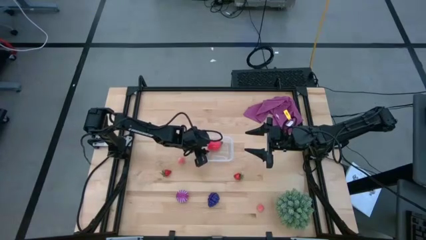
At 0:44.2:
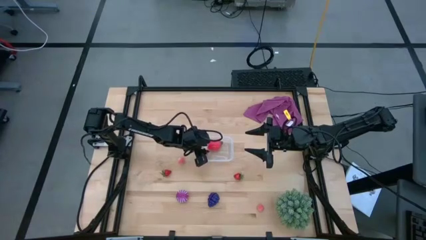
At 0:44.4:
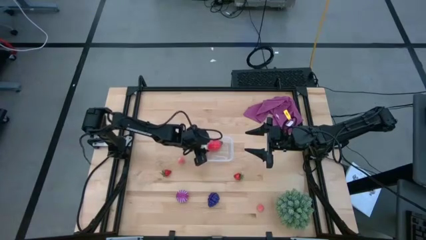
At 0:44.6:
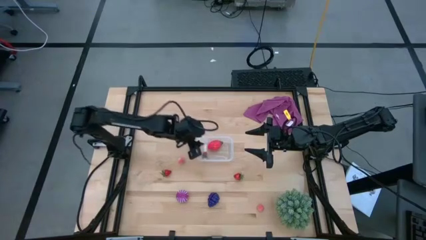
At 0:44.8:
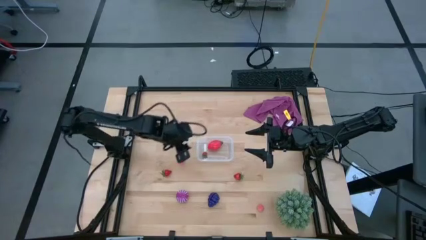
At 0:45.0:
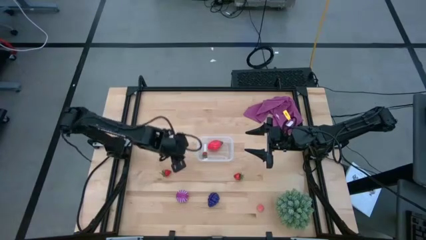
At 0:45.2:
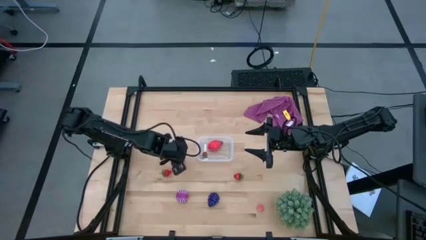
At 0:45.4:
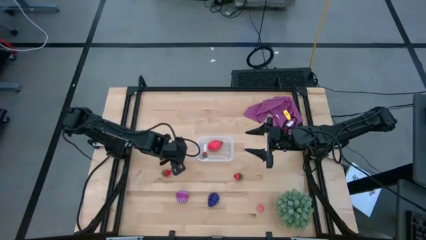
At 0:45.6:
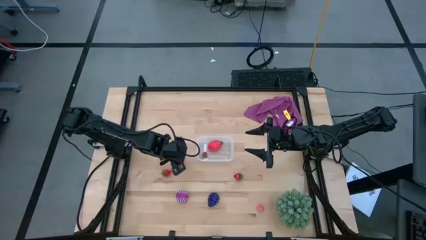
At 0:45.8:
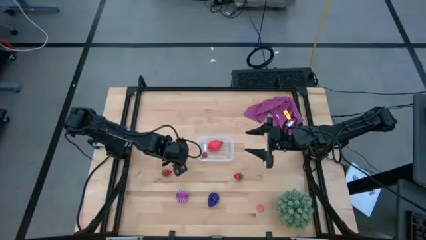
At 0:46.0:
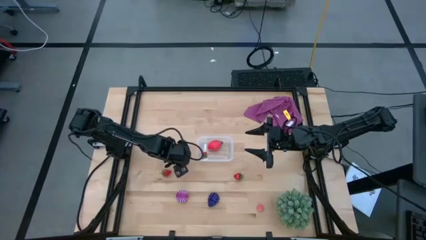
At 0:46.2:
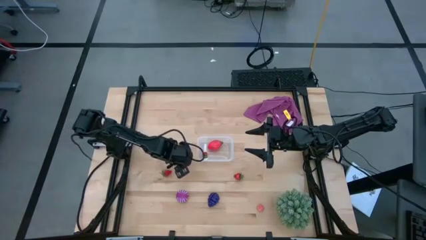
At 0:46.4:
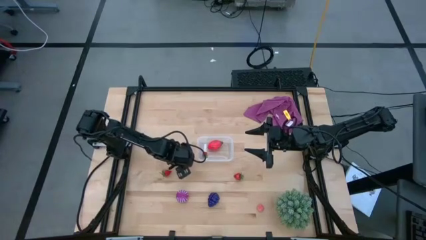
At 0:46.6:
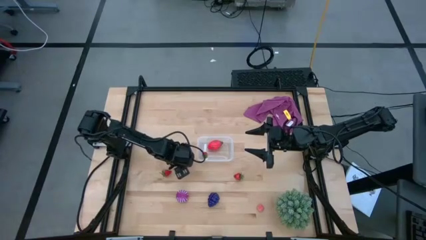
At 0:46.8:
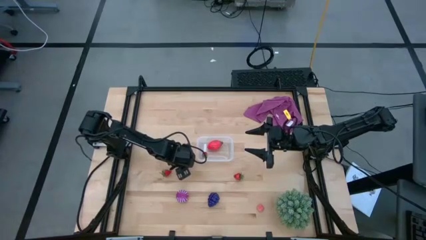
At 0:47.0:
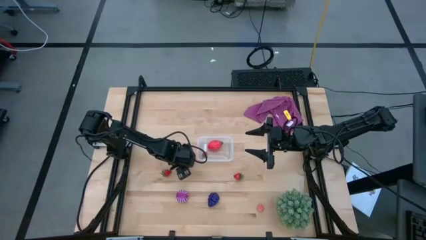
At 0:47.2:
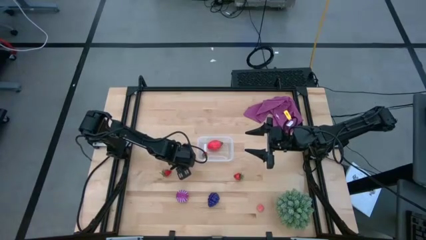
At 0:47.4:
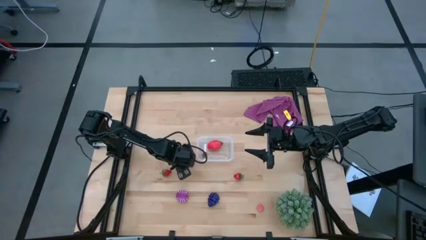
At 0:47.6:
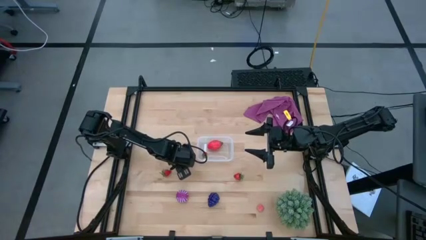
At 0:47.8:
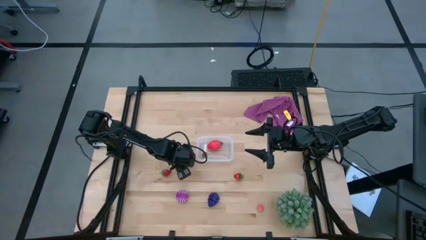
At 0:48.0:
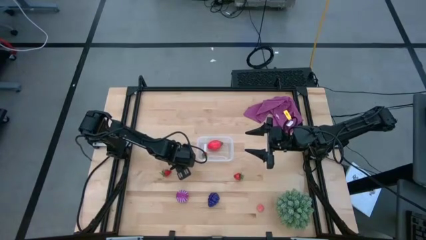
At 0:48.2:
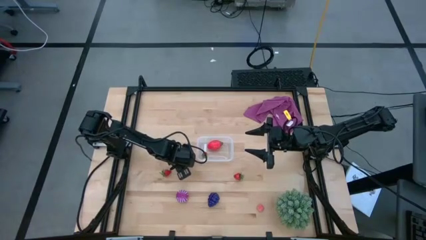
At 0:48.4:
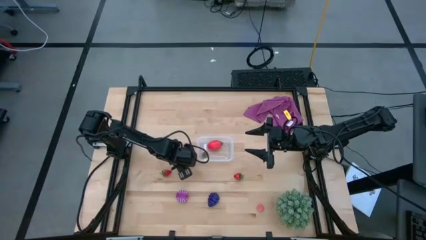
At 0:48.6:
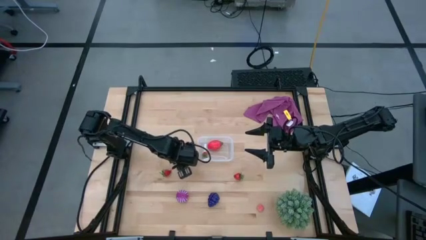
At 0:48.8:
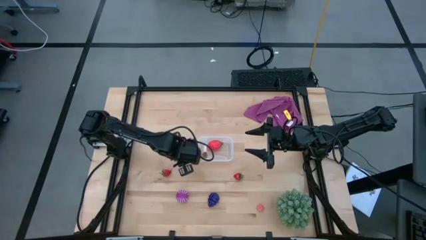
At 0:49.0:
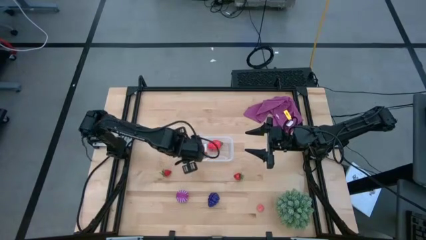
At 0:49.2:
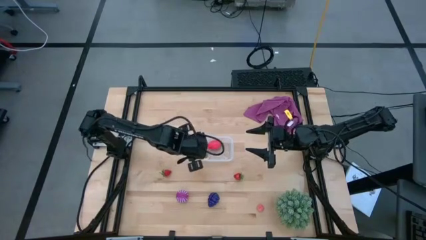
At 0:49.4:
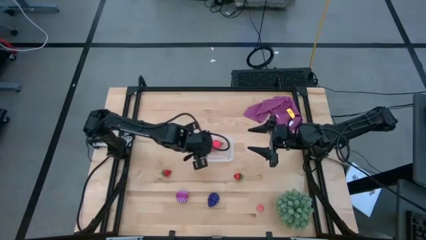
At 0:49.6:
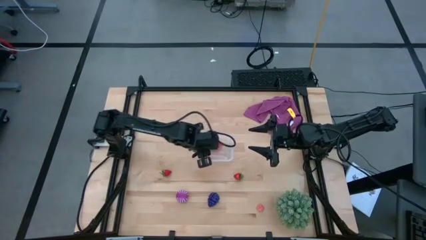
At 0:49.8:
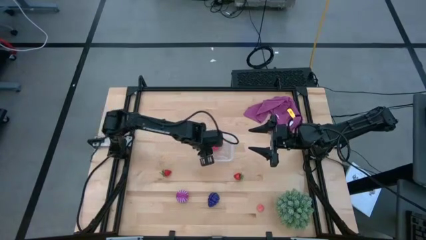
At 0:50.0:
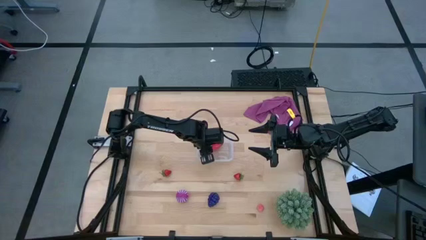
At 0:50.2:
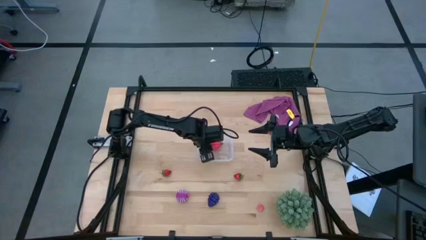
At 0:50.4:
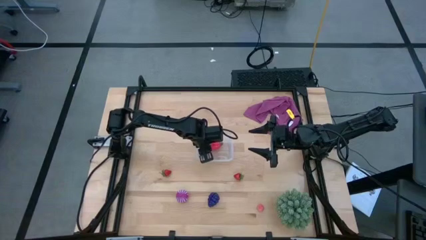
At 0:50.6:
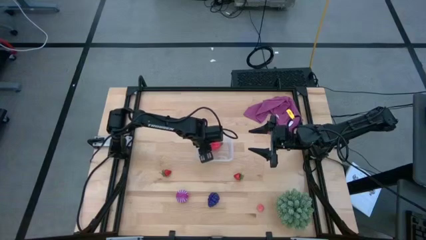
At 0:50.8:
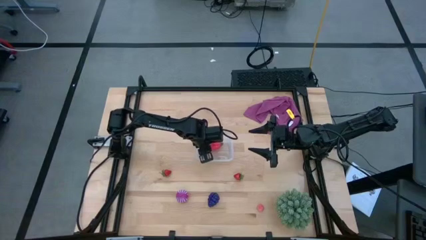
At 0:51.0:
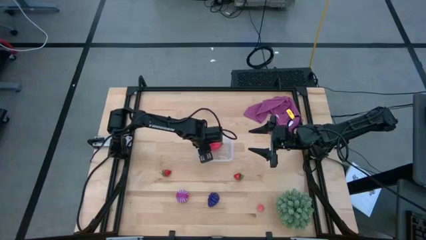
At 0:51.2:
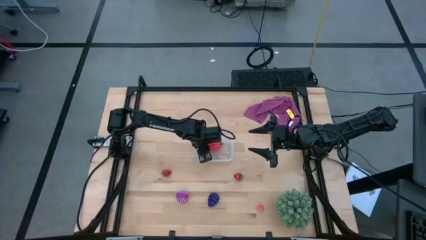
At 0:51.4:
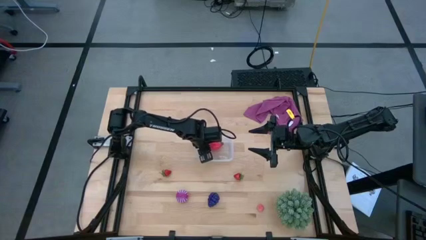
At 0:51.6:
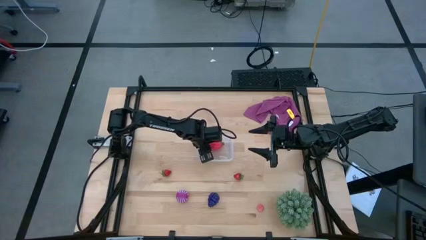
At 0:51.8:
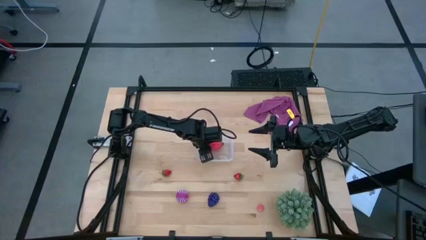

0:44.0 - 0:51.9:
Task: Pick and placing Produce into tupperware
Put the left pink peach into the transparent container

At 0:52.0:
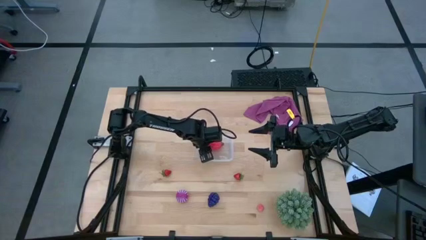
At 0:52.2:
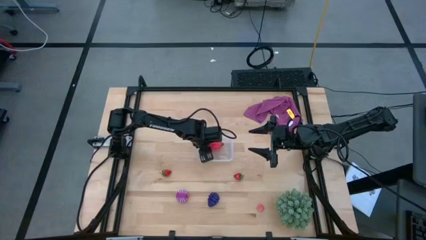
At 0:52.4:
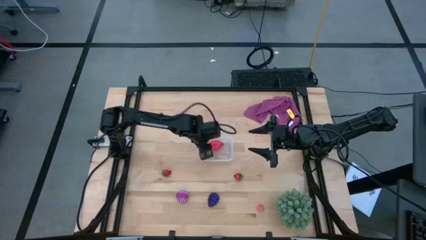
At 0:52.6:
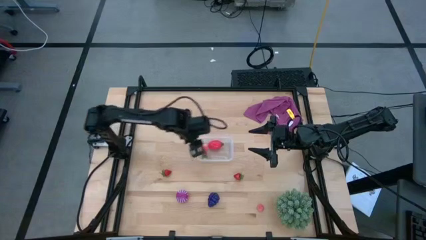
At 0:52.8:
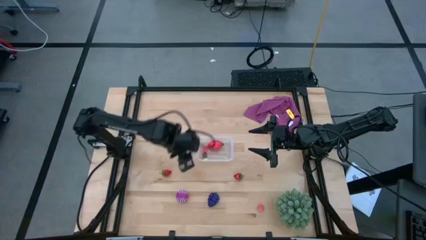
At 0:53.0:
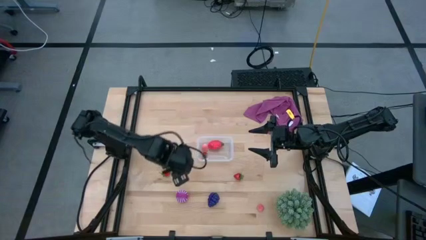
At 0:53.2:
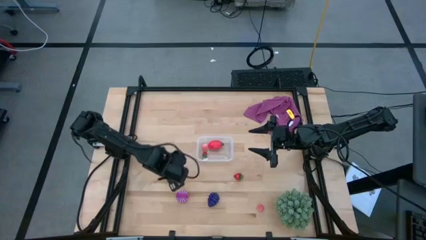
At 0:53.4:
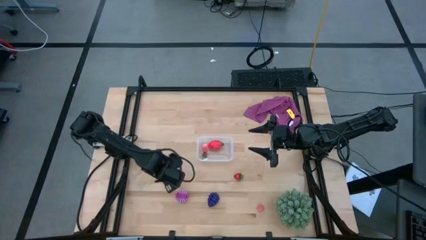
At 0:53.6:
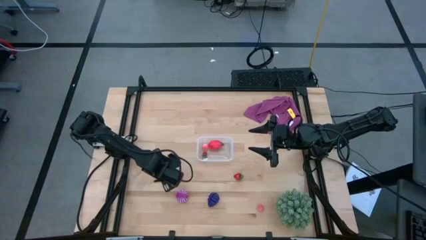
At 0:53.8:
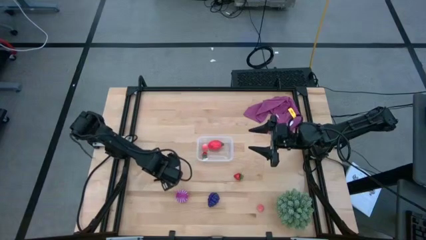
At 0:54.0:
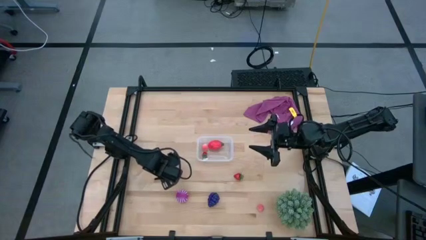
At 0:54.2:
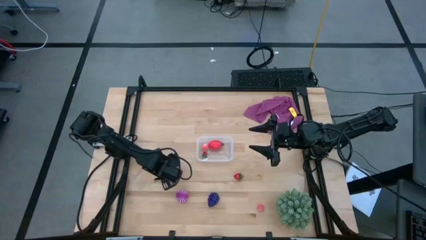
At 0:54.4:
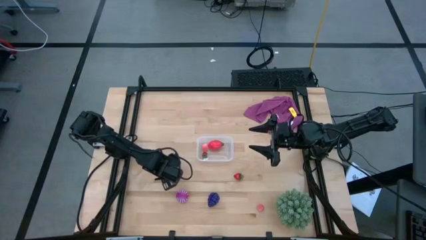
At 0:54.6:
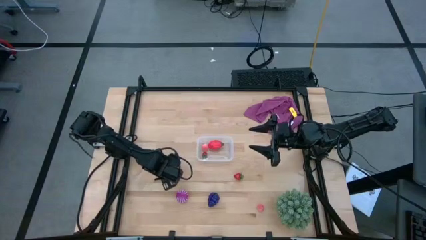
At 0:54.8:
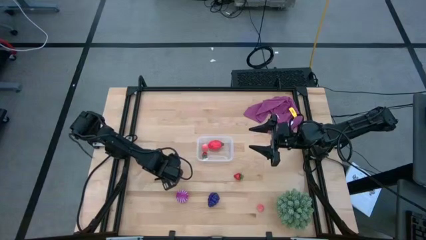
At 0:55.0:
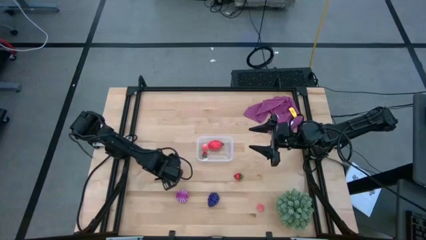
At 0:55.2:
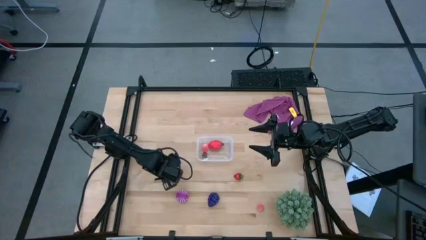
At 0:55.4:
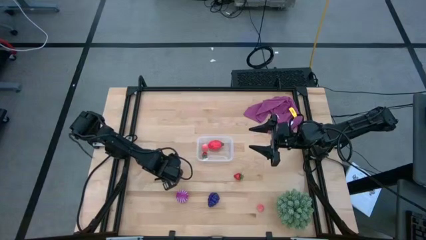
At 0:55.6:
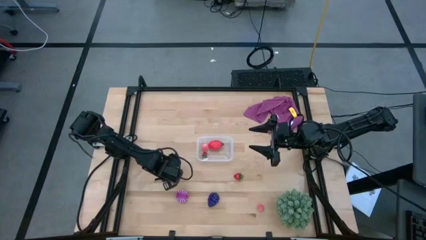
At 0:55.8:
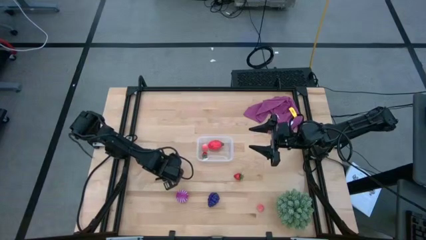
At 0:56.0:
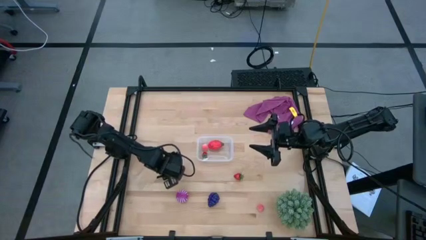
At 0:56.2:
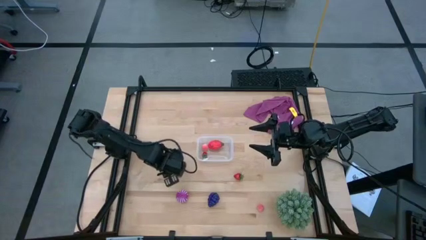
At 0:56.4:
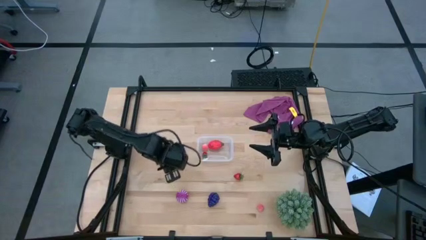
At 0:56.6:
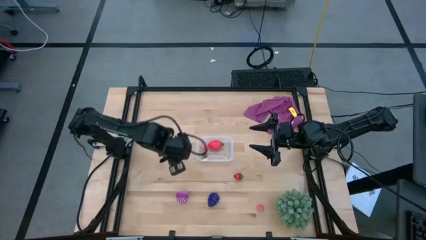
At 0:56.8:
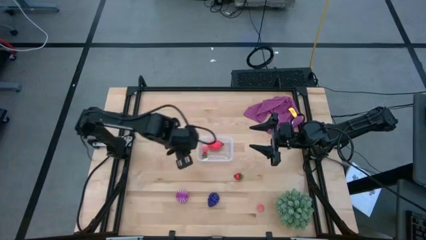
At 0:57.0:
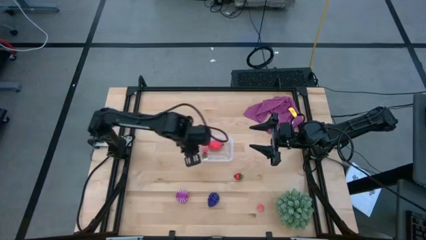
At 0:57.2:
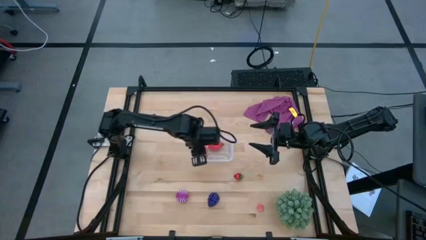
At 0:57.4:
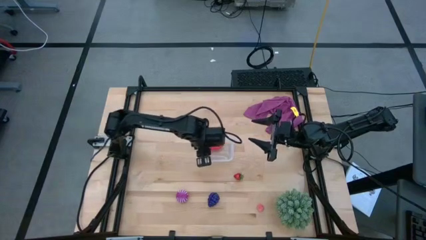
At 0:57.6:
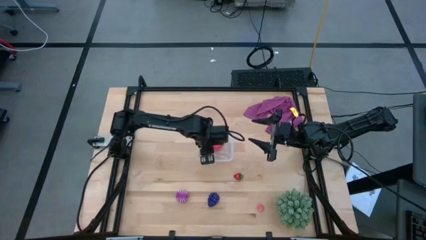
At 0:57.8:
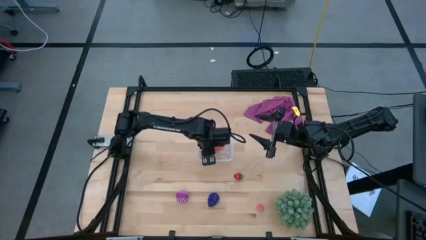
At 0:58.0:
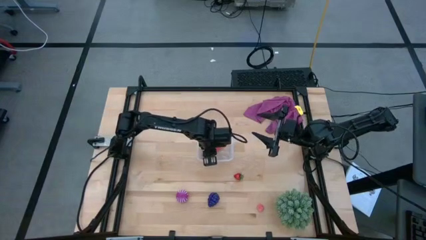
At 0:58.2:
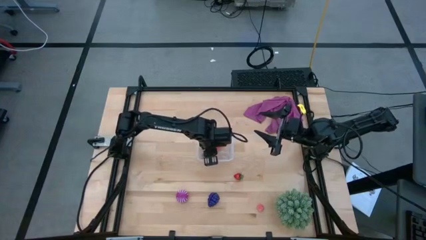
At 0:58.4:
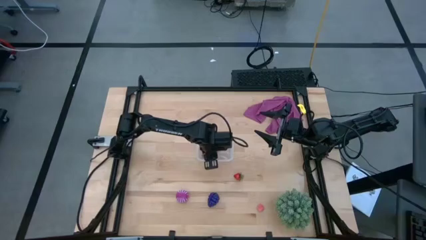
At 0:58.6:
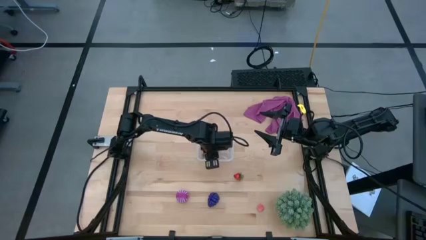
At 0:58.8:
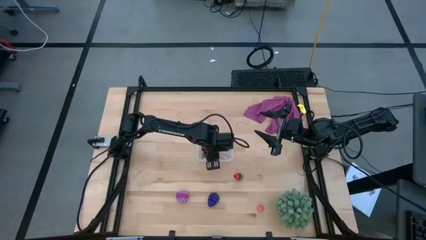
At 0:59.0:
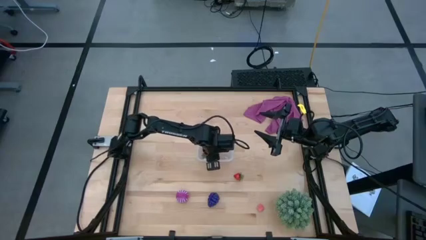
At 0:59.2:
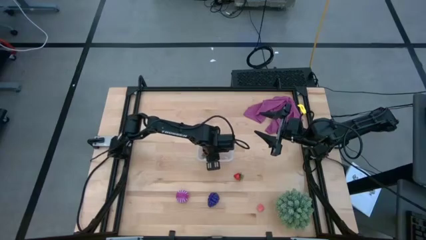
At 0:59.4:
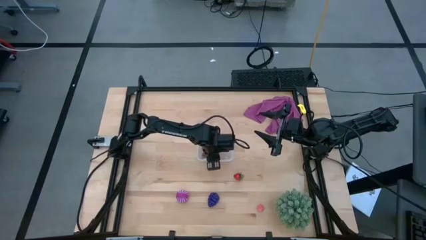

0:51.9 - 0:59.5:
Put the left red strawberry fruit into the transparent container
